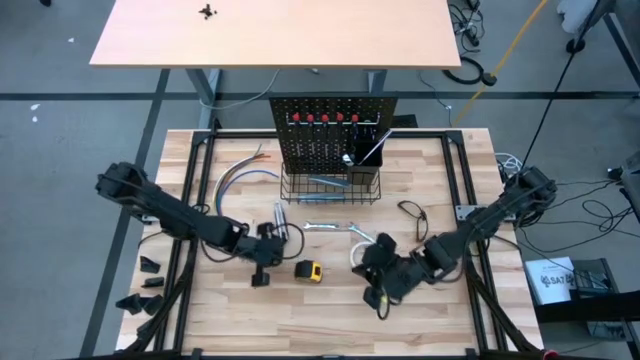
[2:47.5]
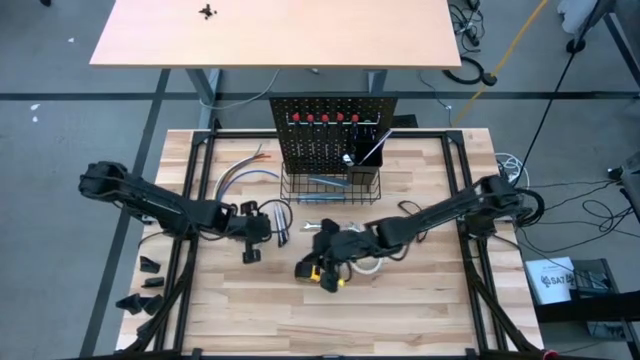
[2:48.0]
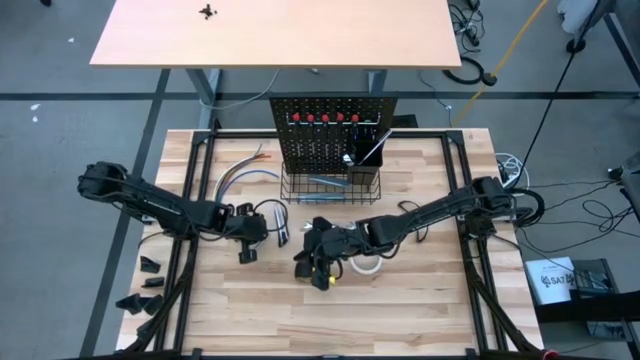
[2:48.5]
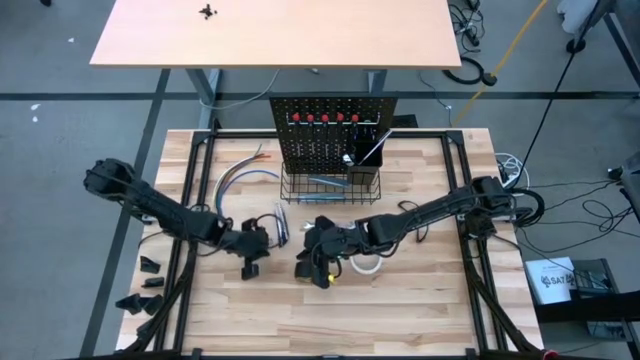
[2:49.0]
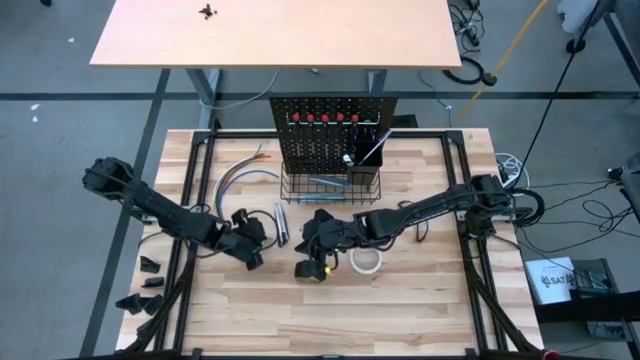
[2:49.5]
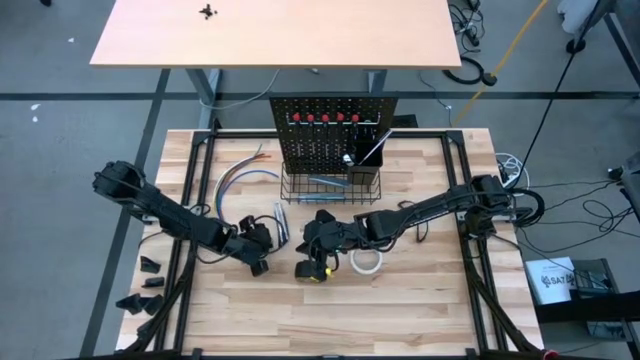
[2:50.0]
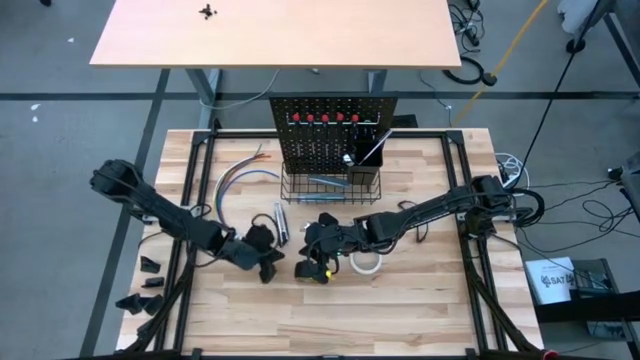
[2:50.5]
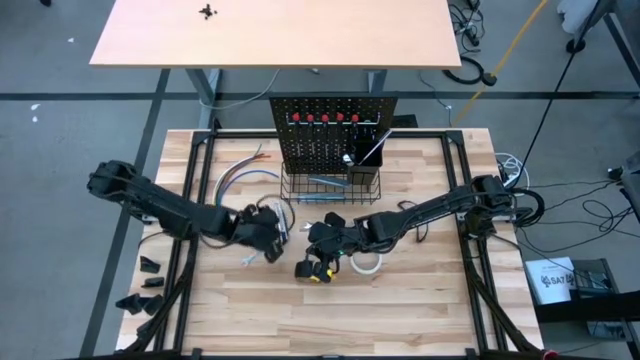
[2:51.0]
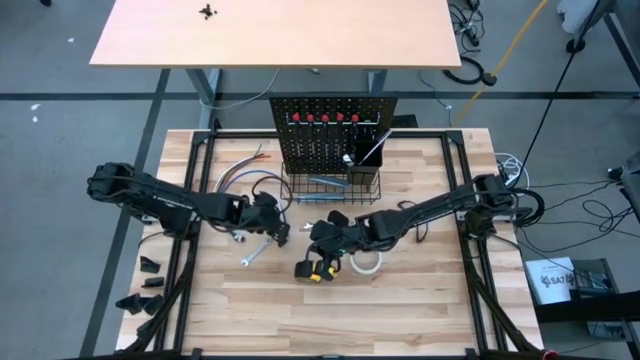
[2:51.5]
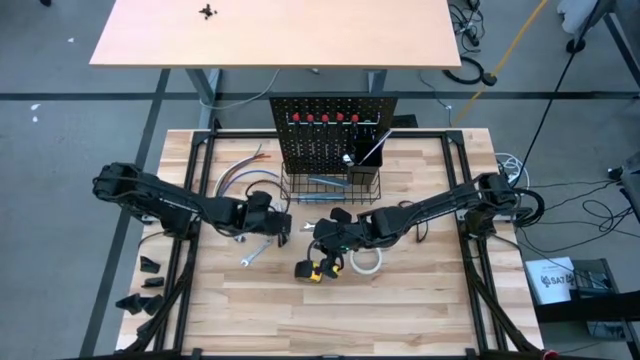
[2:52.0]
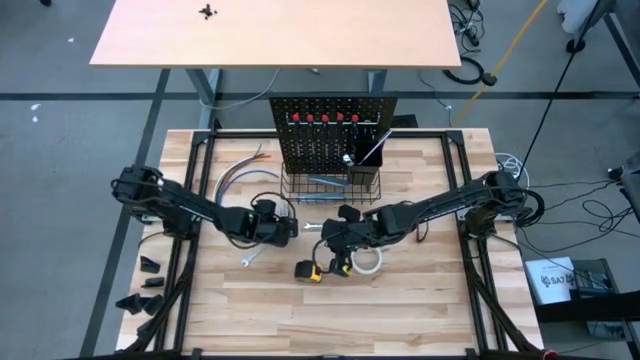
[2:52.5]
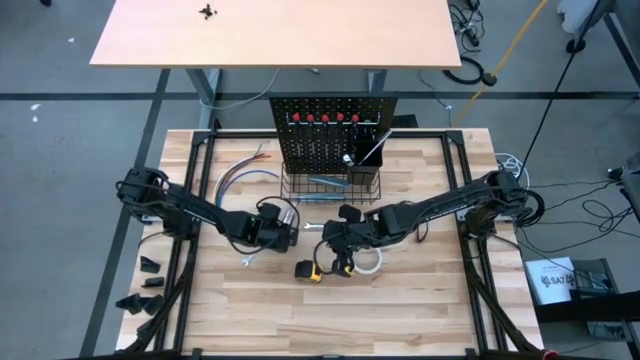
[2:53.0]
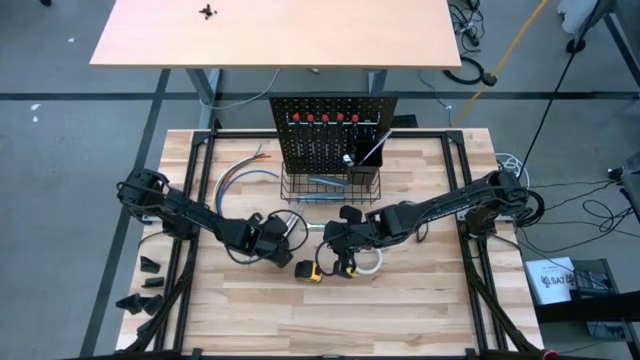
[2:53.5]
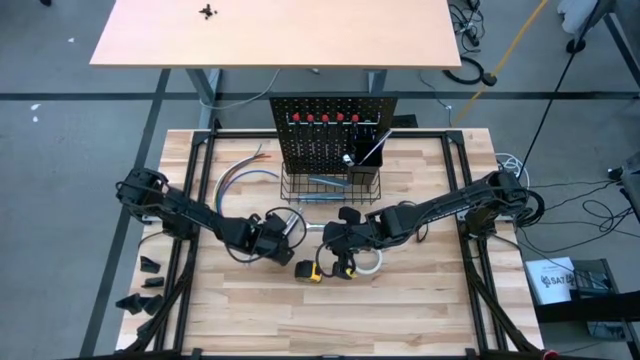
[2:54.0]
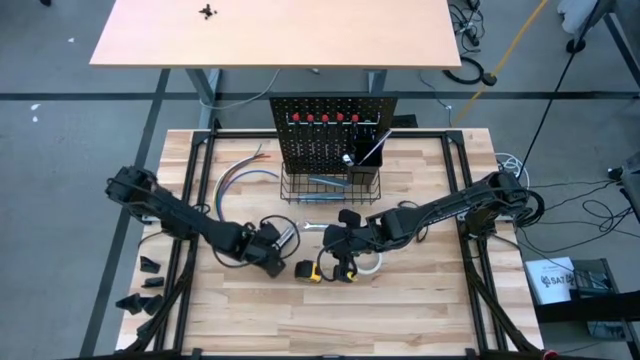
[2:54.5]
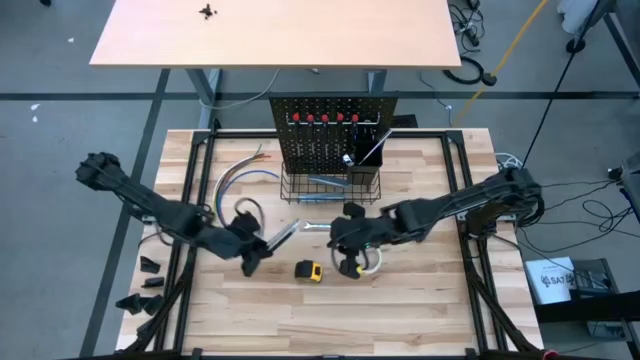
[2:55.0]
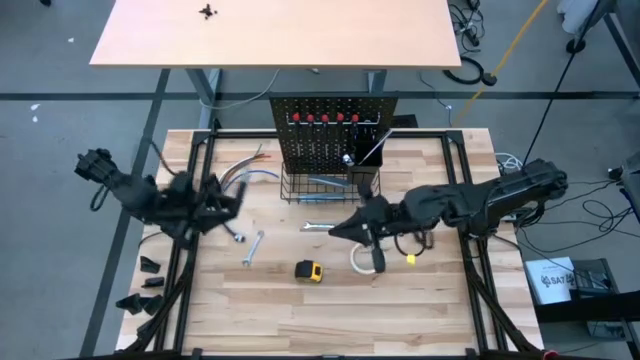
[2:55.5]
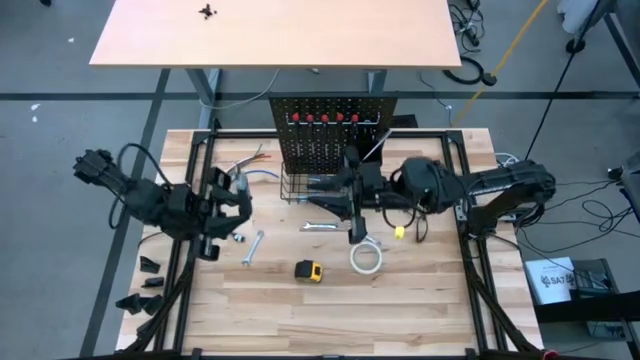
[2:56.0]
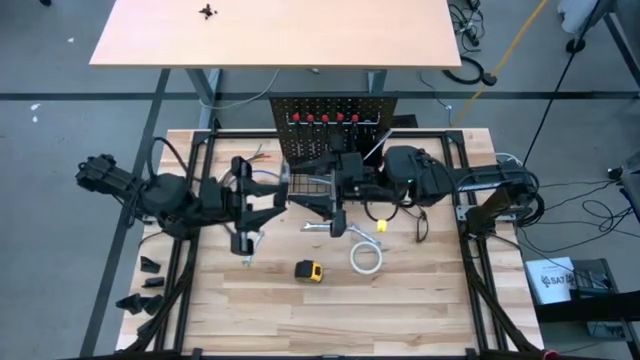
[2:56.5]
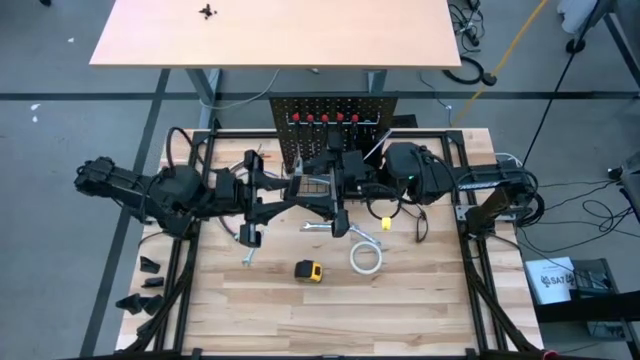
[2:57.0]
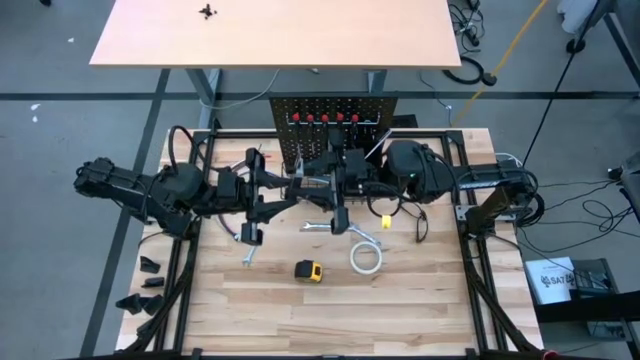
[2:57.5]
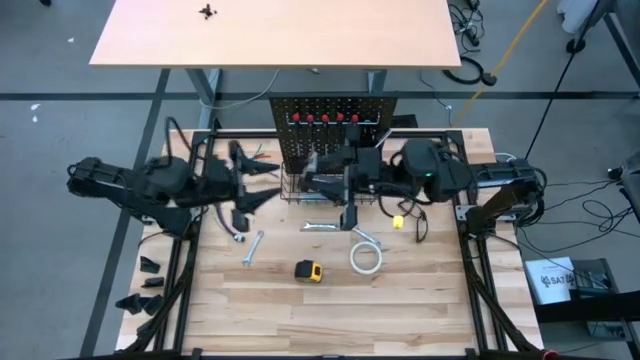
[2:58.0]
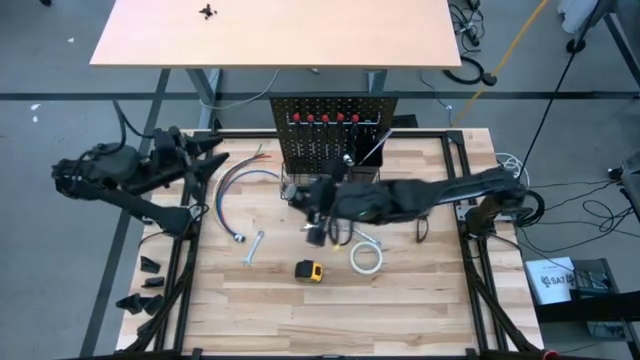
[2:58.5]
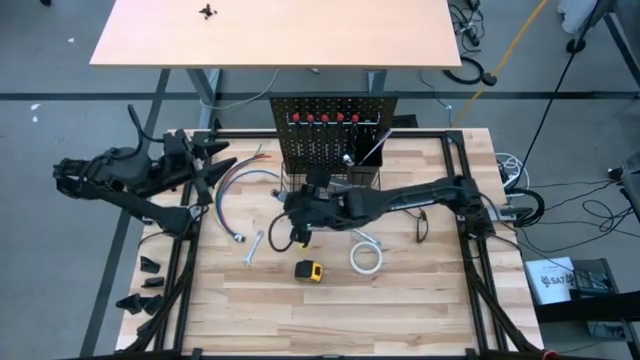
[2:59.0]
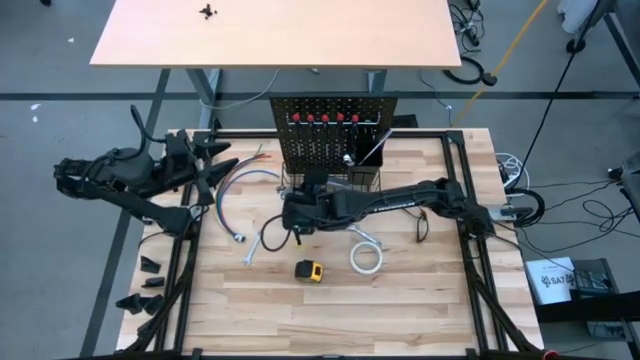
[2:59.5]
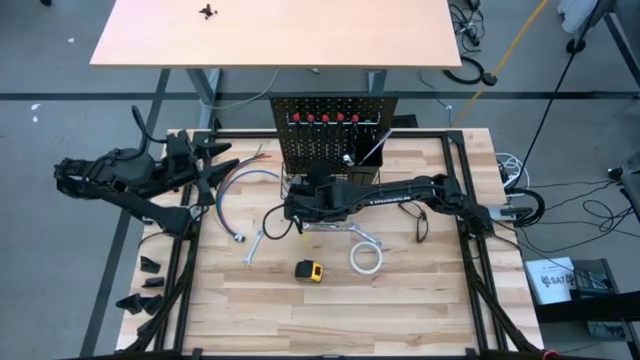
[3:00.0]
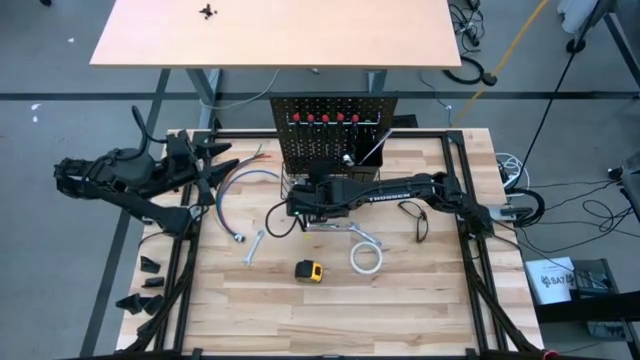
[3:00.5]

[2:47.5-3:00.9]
Task: Hang tools onto peg board
Put the black utility knife into the pegboard basket

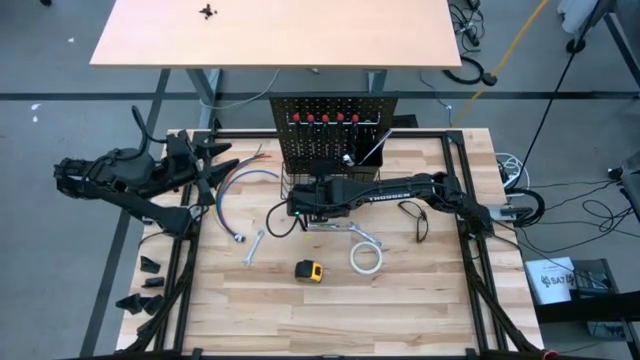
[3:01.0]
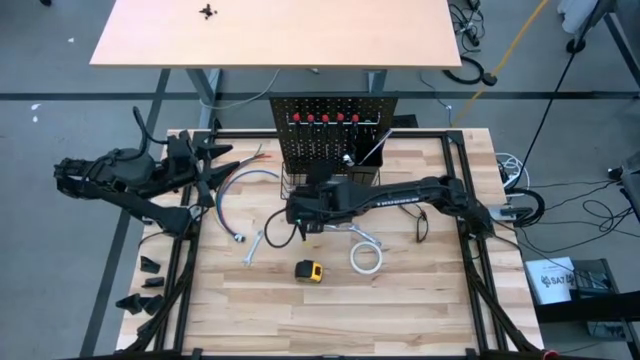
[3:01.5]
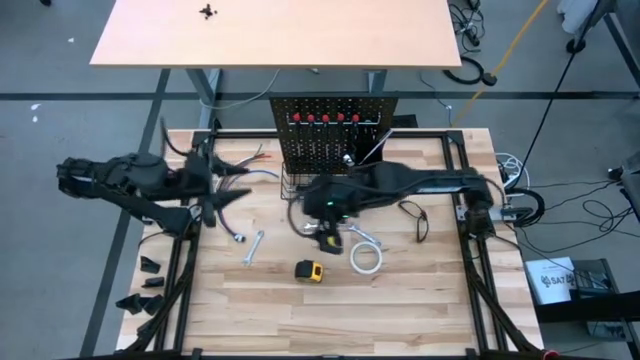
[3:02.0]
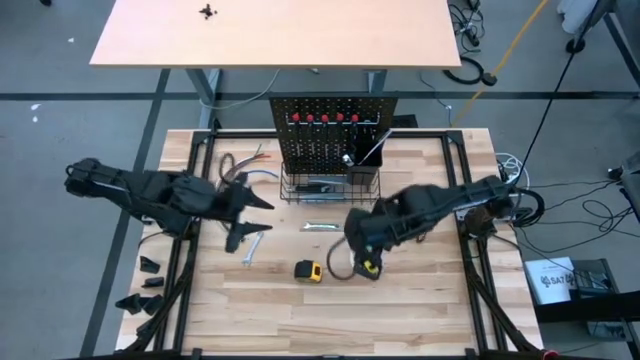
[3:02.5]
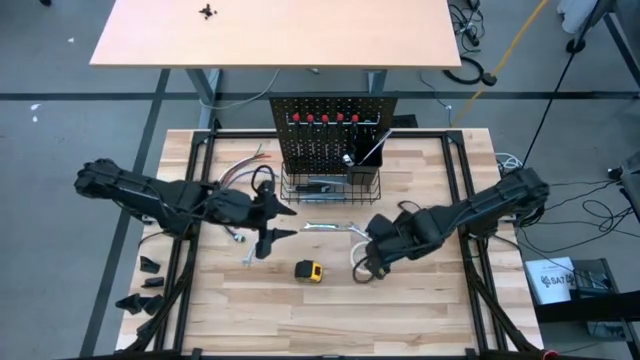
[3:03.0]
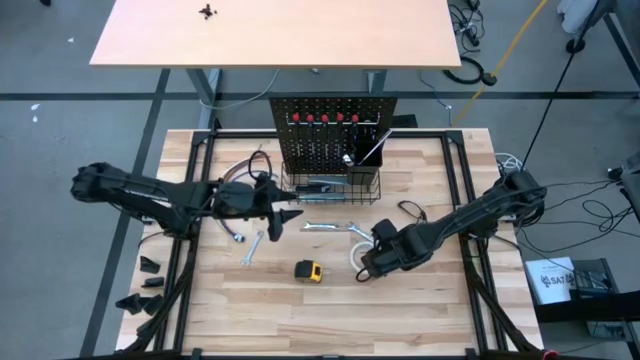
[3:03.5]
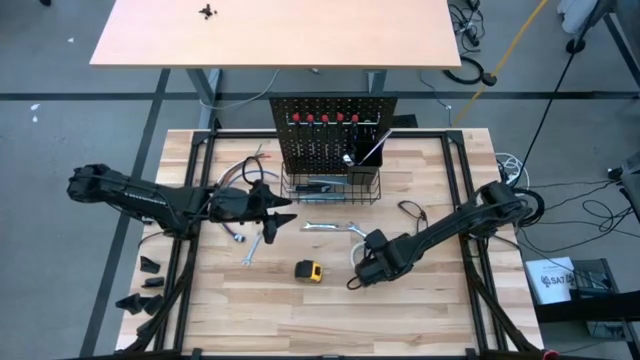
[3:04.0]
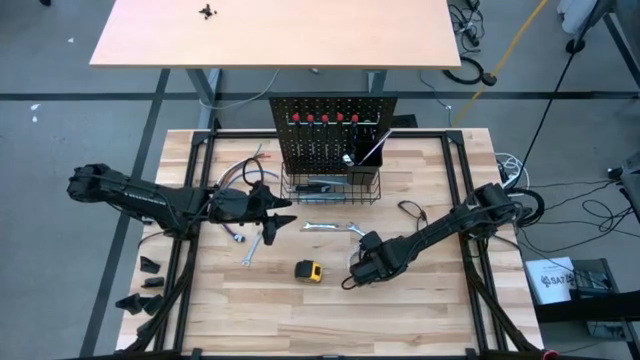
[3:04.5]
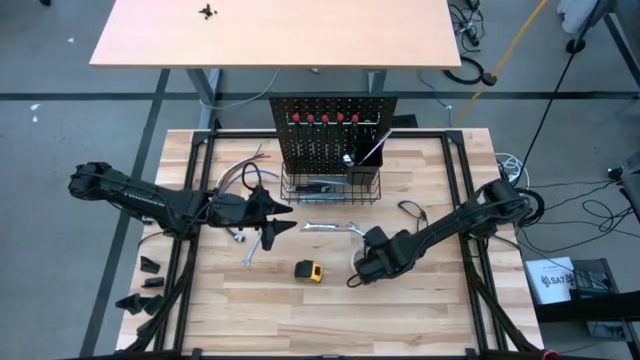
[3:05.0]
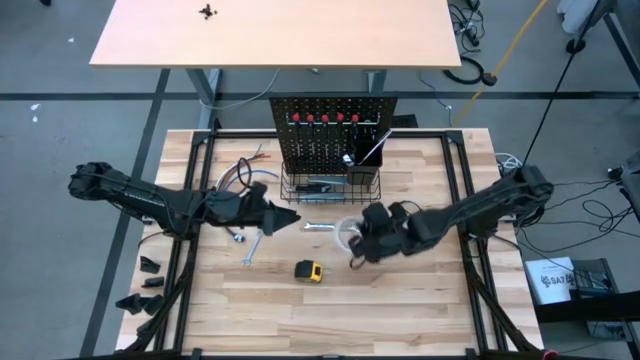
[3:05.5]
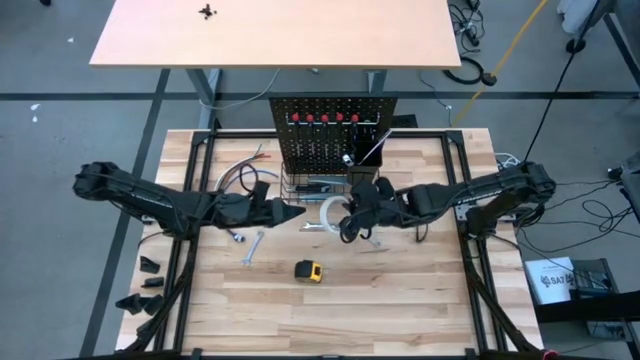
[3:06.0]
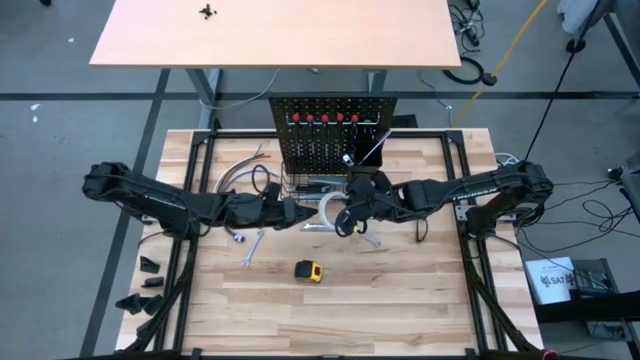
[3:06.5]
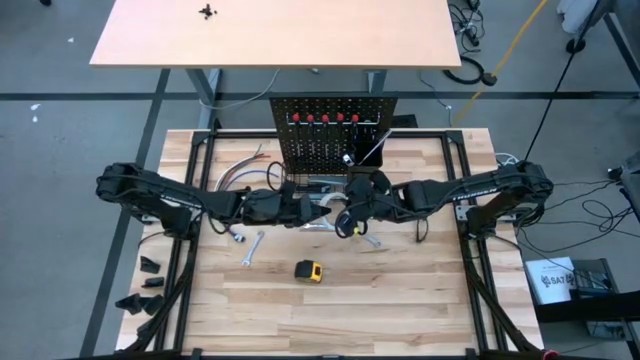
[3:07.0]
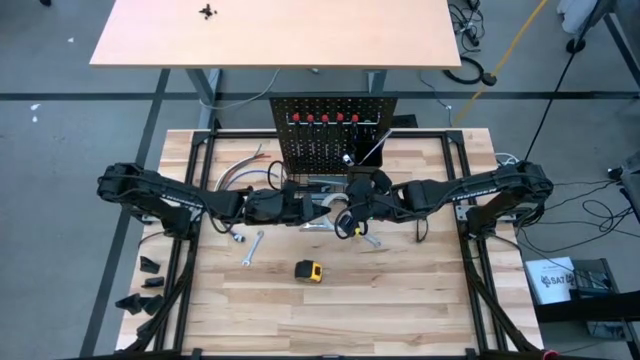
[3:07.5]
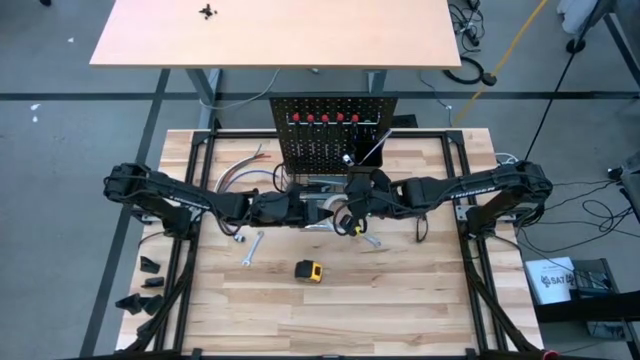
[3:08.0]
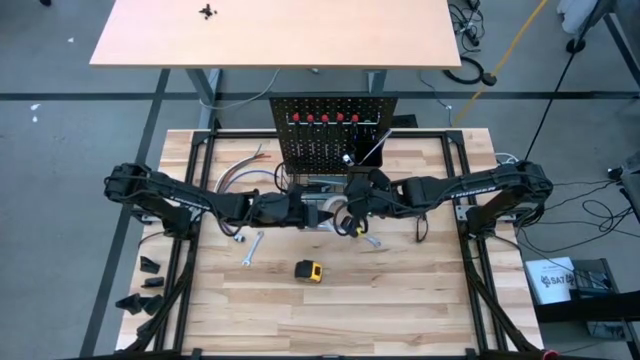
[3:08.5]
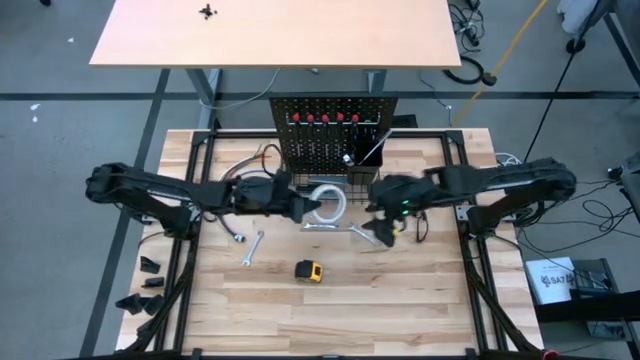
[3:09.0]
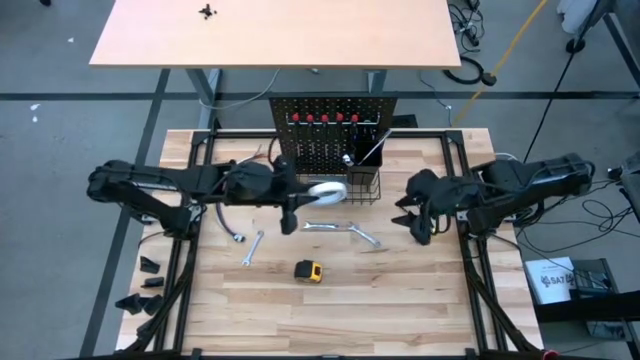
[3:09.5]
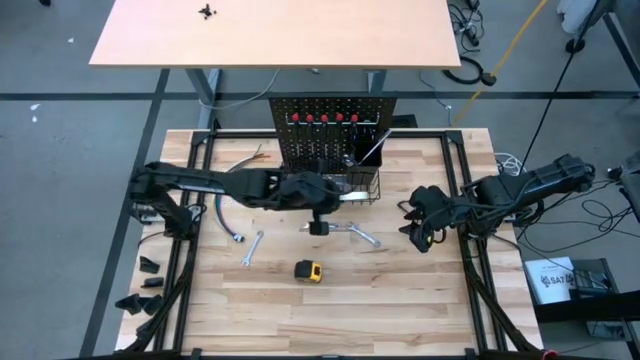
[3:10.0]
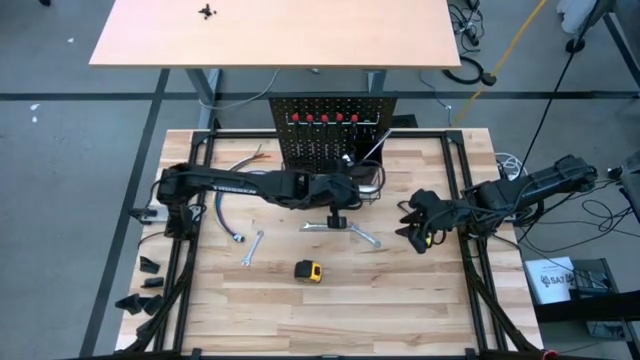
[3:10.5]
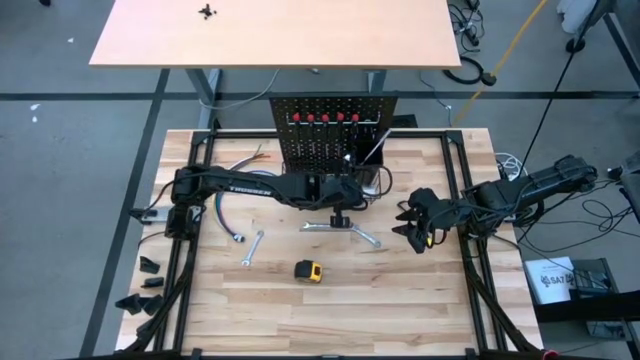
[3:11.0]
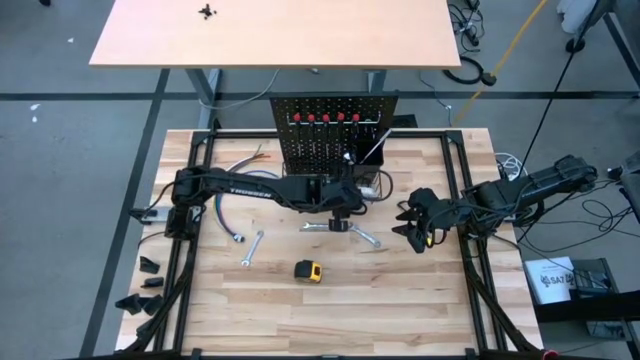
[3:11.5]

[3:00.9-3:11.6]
Put the masking tape into the pegboard basket
